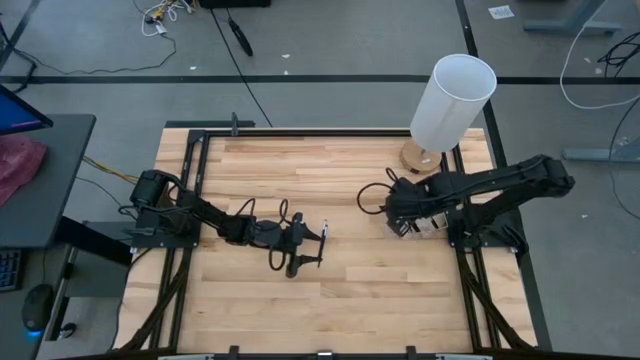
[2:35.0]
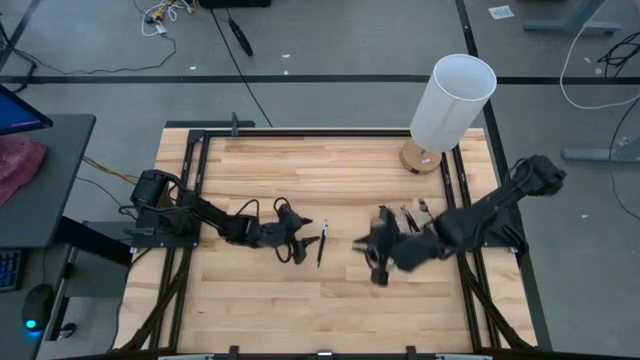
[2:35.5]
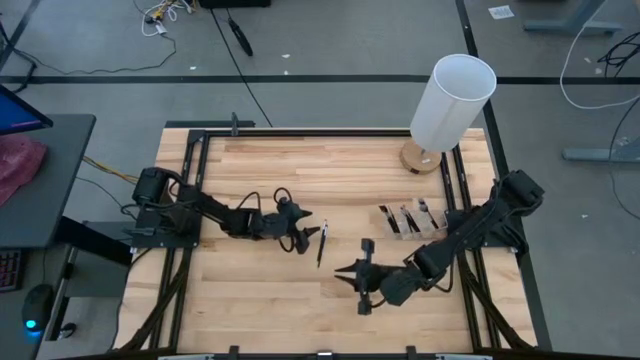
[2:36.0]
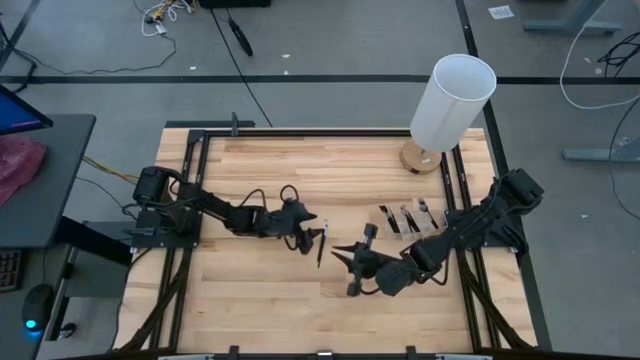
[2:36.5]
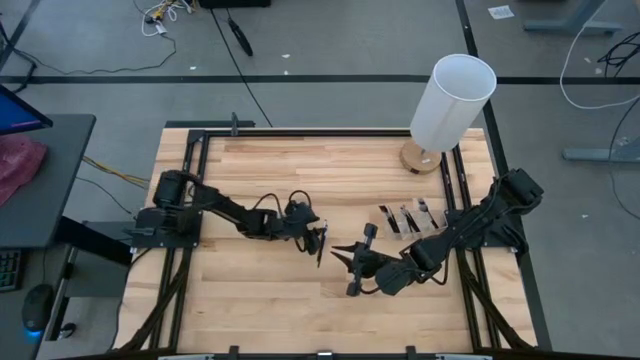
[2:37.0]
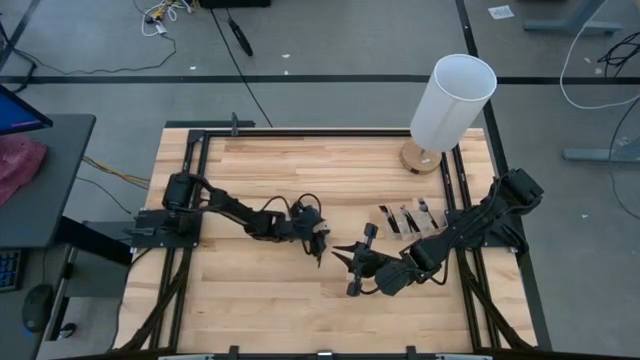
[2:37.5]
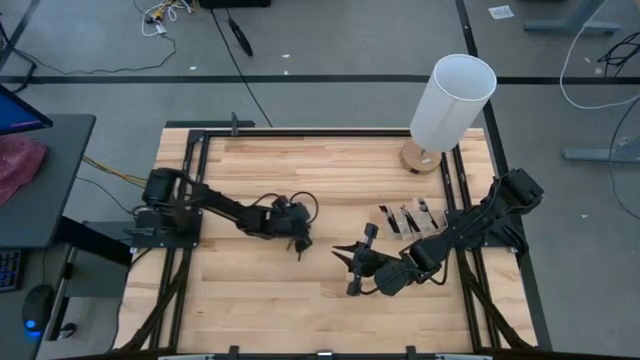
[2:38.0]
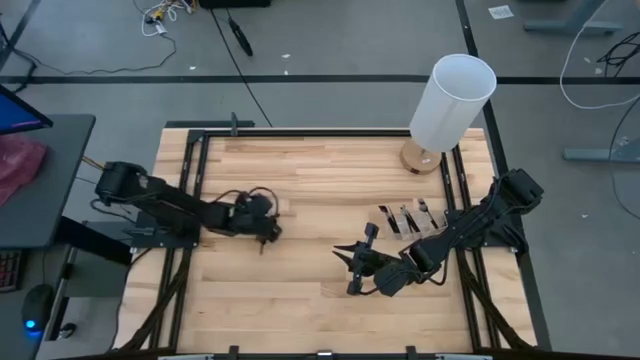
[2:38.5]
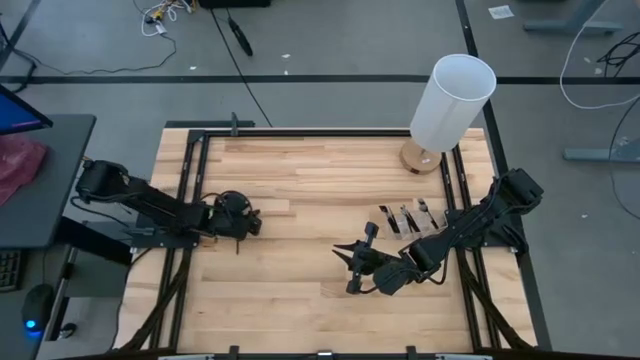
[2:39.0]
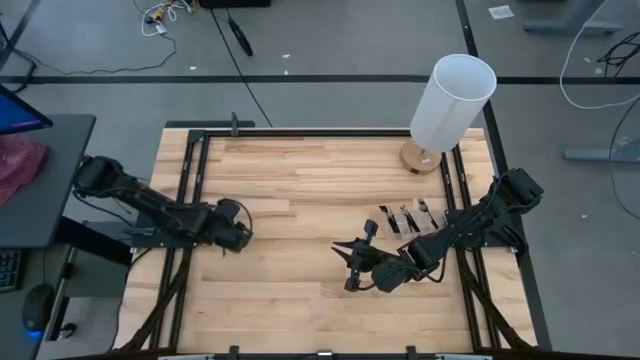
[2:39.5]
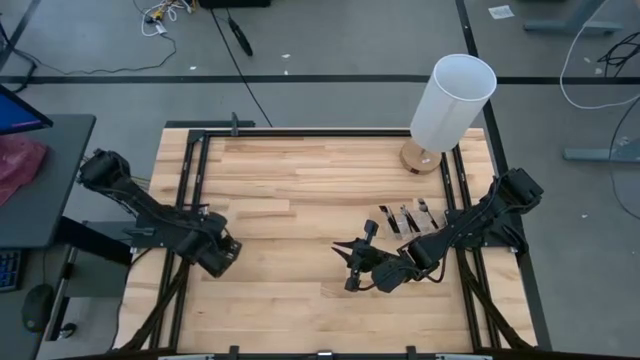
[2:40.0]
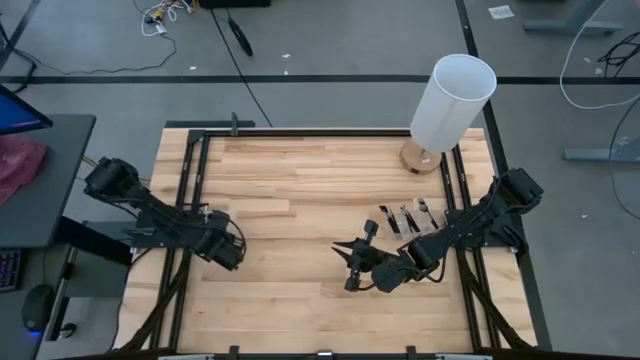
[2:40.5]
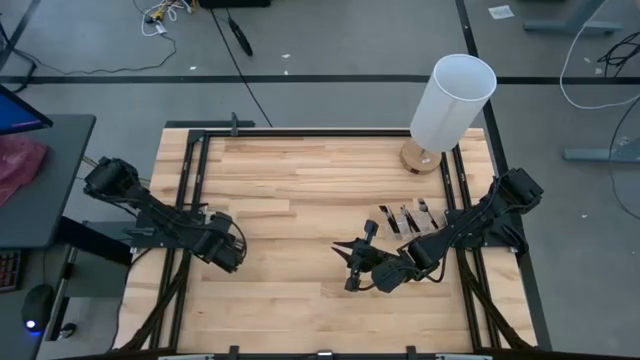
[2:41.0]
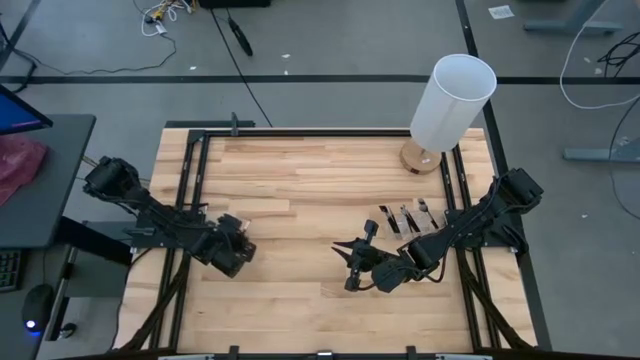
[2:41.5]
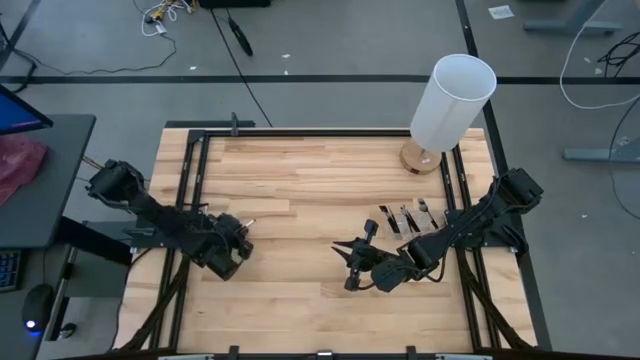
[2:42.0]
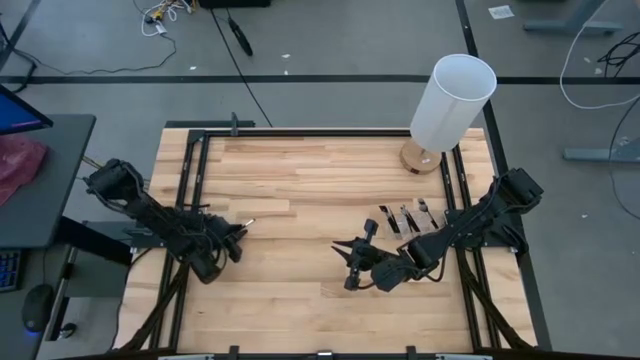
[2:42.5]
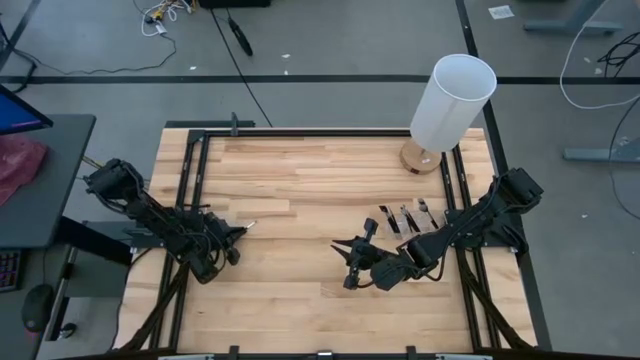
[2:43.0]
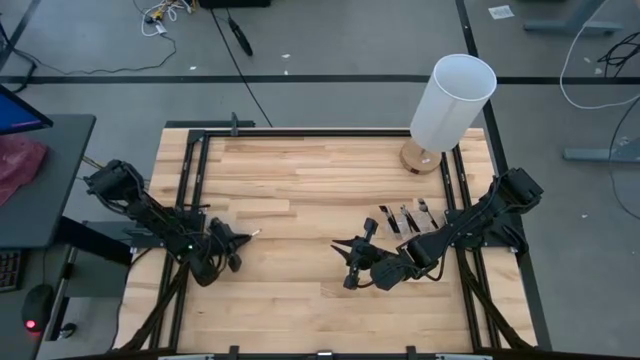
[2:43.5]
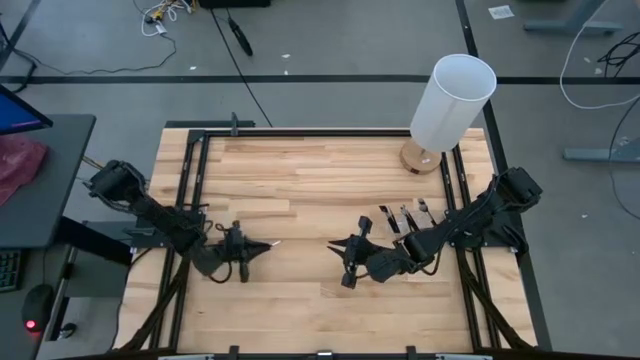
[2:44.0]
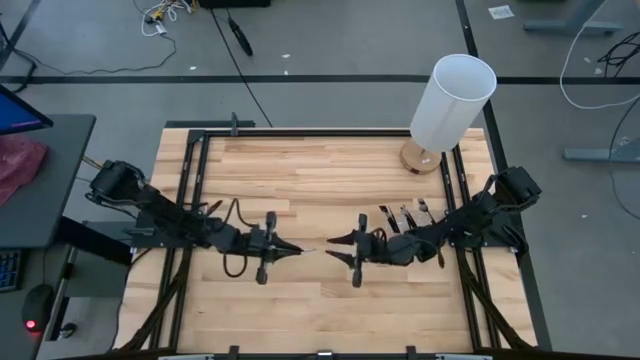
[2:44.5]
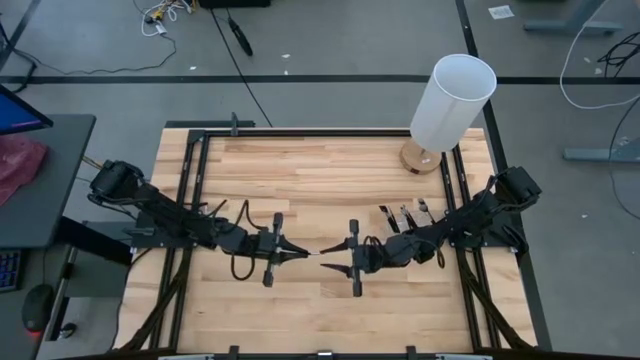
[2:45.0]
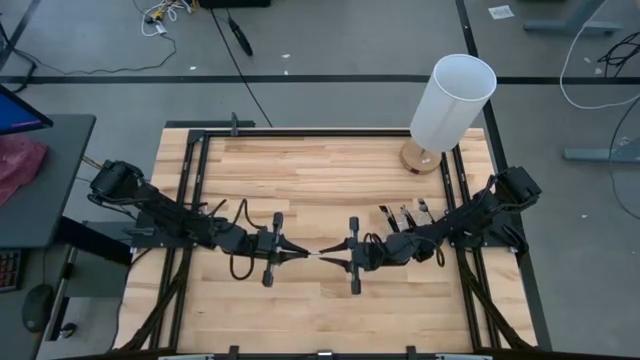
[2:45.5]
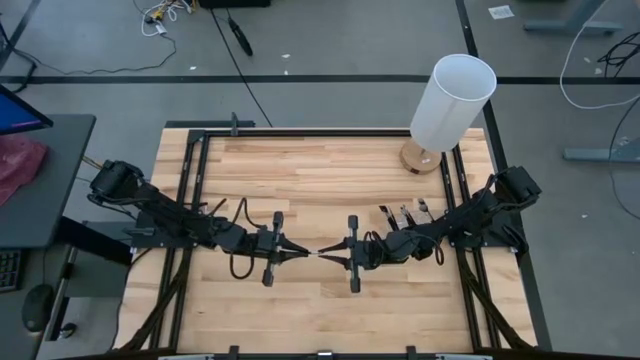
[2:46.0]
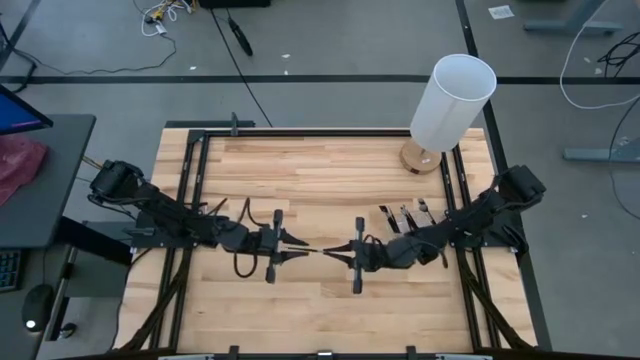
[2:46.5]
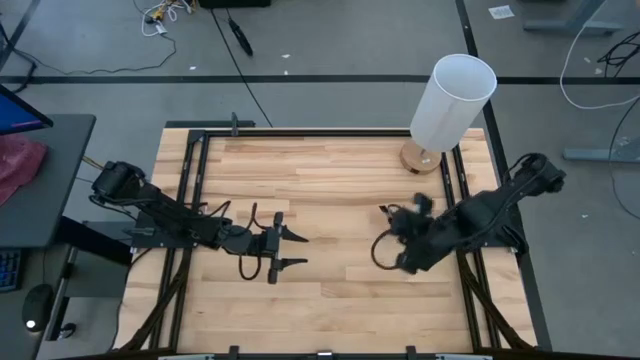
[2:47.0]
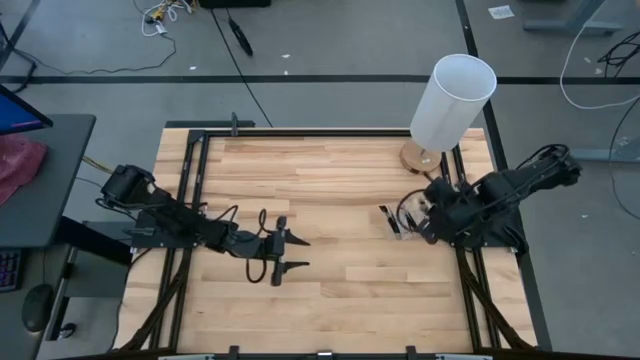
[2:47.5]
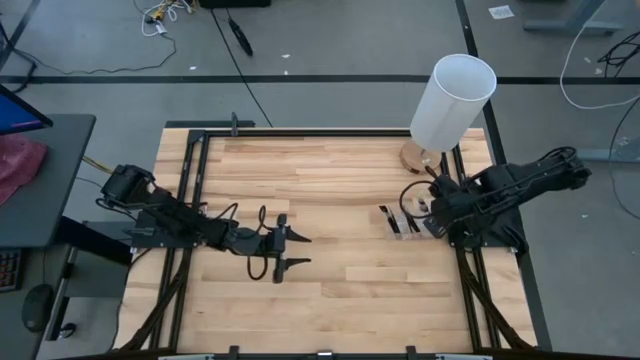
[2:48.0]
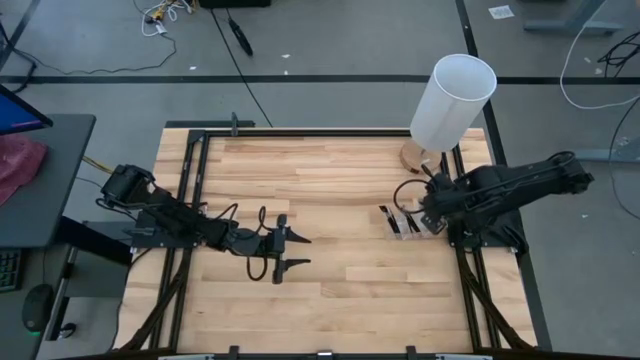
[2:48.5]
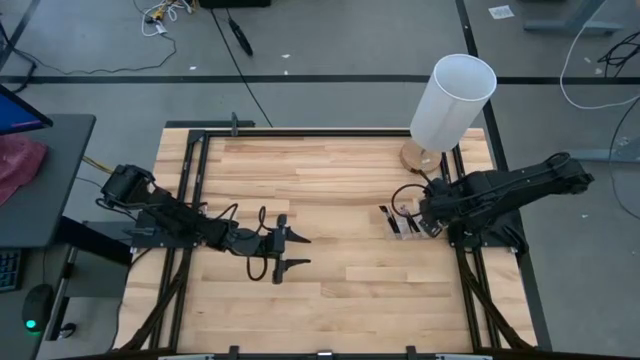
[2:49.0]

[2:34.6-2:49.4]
Task: Put items in baskets/containers
Put the black eyeshadow brush into the transparent organizer

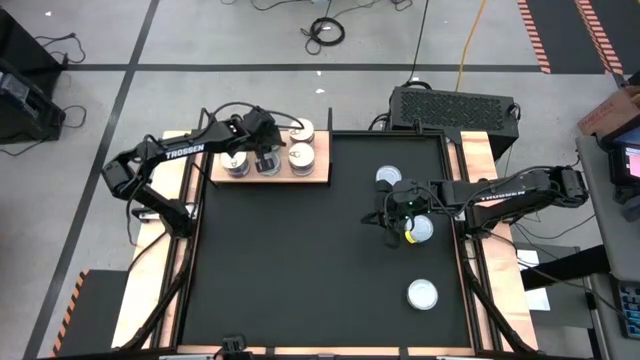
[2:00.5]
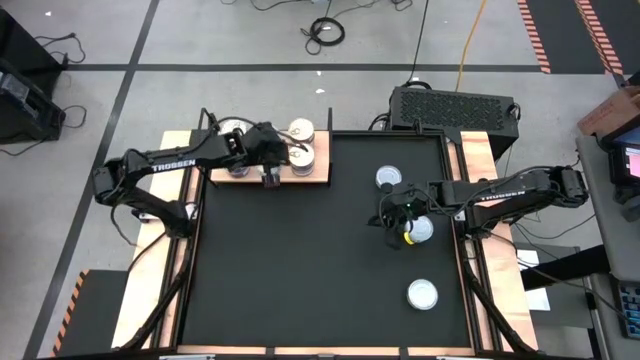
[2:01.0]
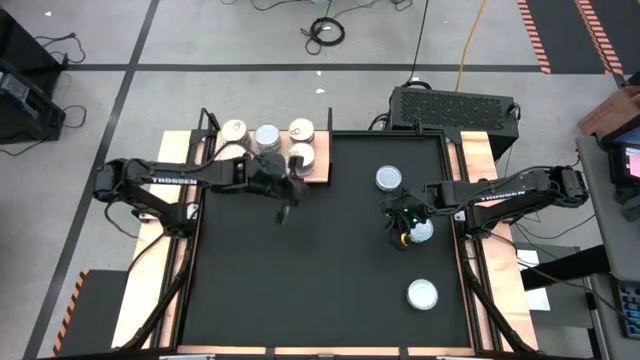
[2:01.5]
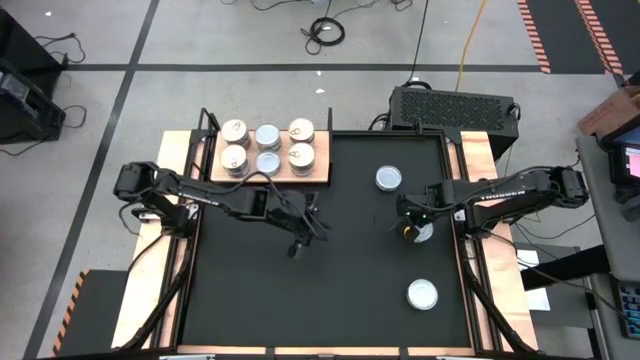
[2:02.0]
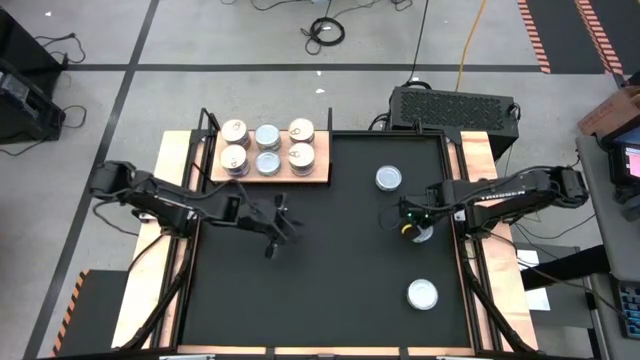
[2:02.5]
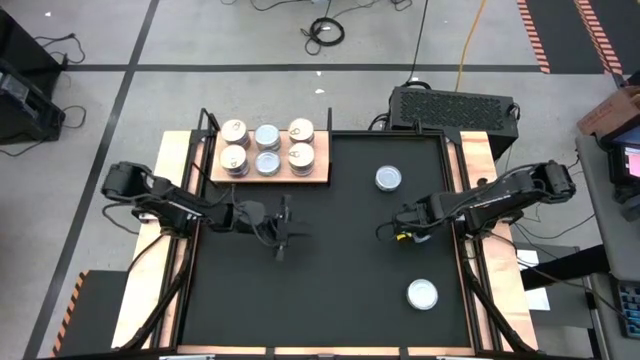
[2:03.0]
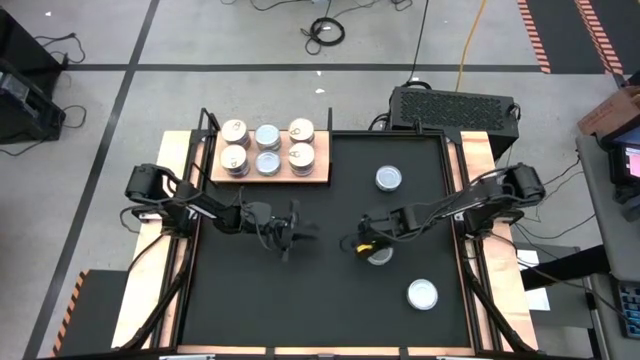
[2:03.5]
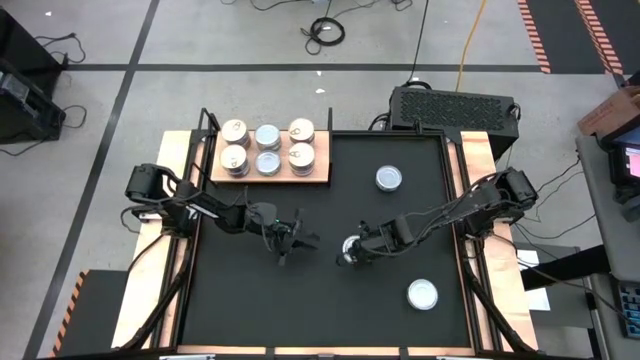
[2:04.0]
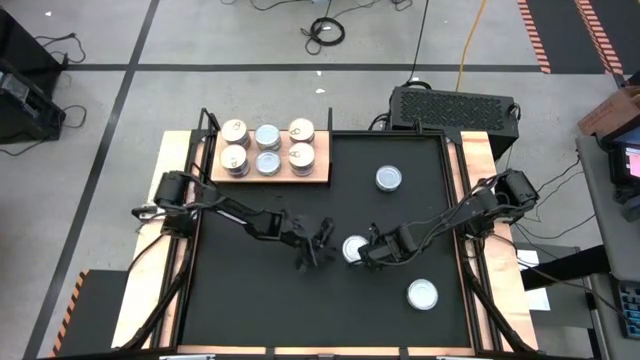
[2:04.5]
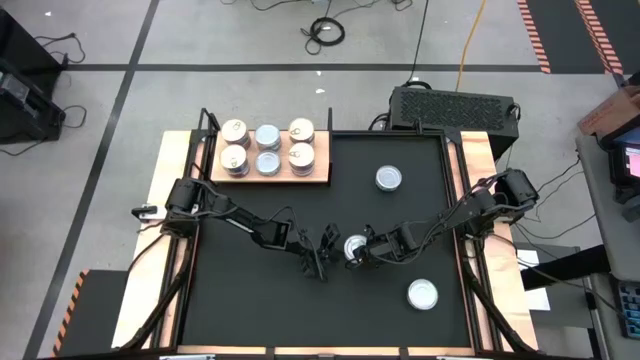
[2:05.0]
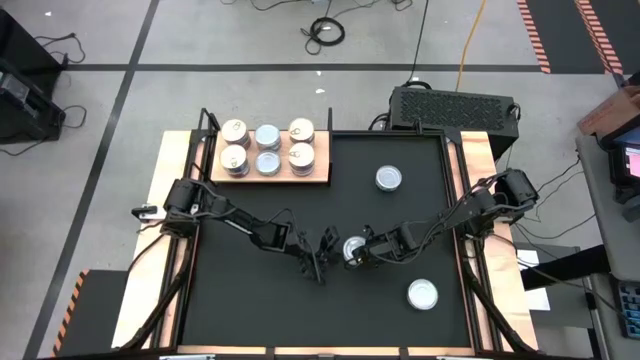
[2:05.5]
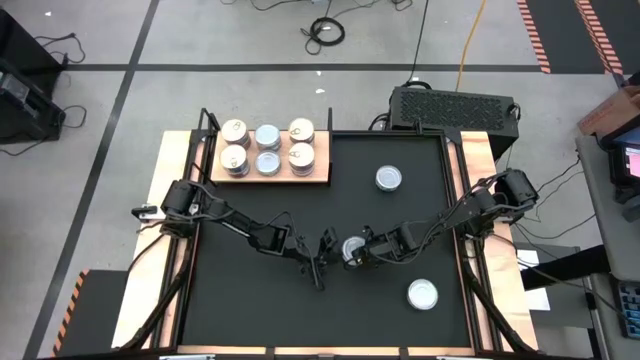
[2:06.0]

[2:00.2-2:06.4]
Task: Stack canned seafood by type on shelf
Stack the green tuna can on top of the green tuna can on the shelf
